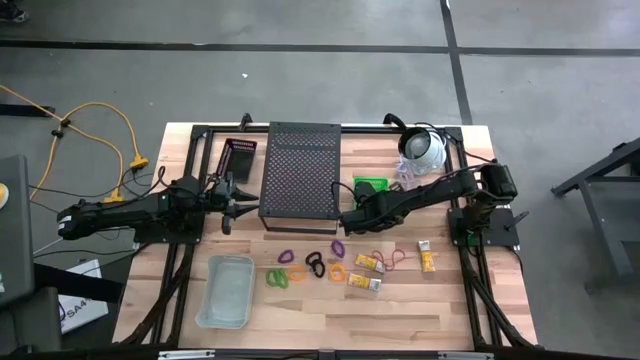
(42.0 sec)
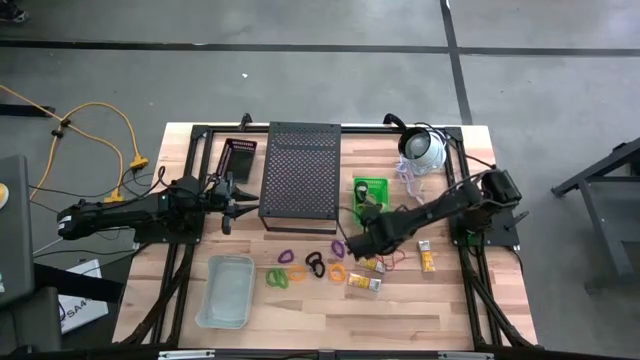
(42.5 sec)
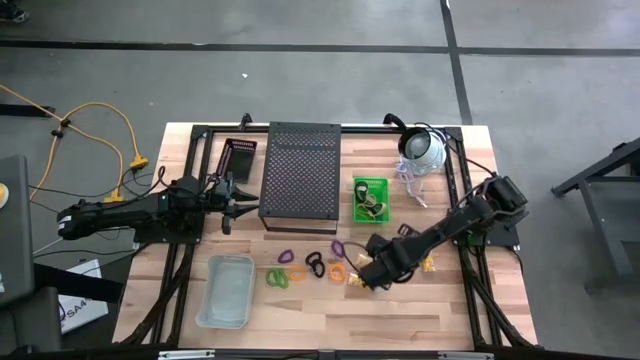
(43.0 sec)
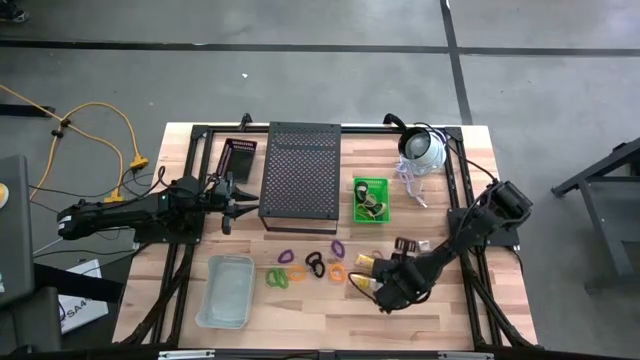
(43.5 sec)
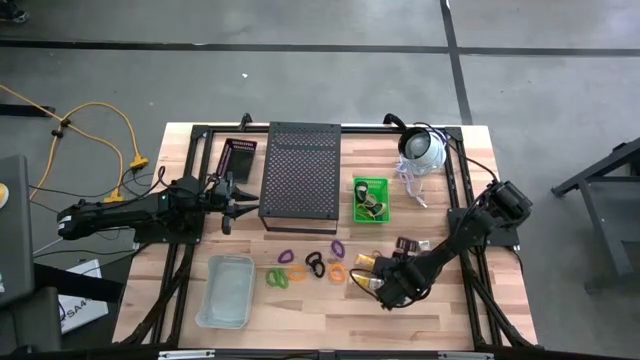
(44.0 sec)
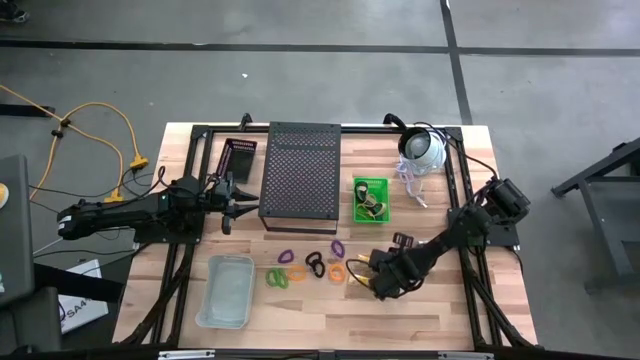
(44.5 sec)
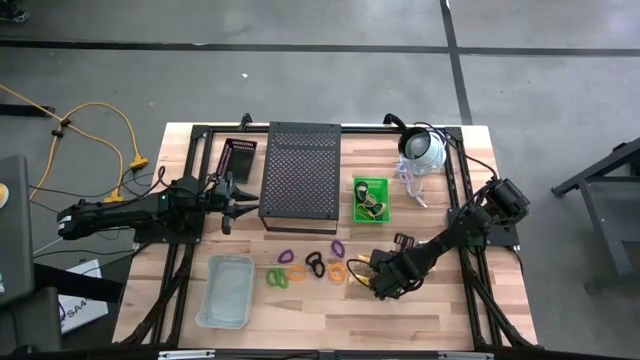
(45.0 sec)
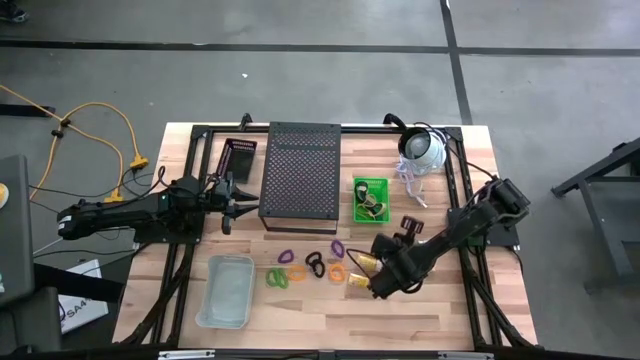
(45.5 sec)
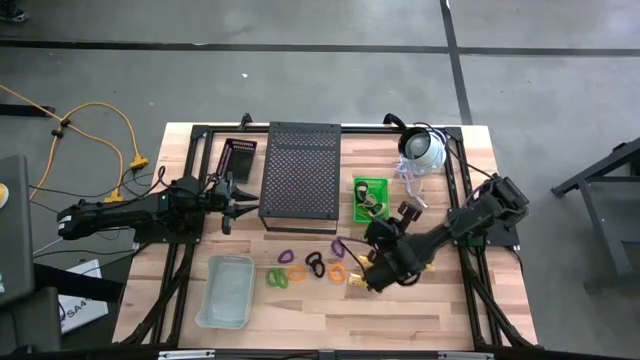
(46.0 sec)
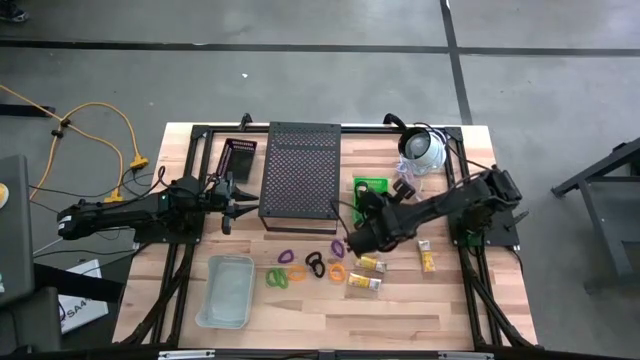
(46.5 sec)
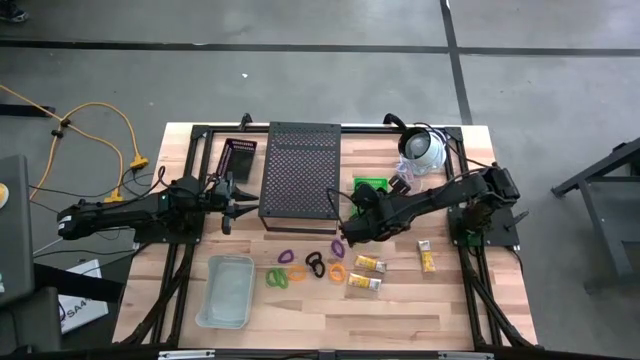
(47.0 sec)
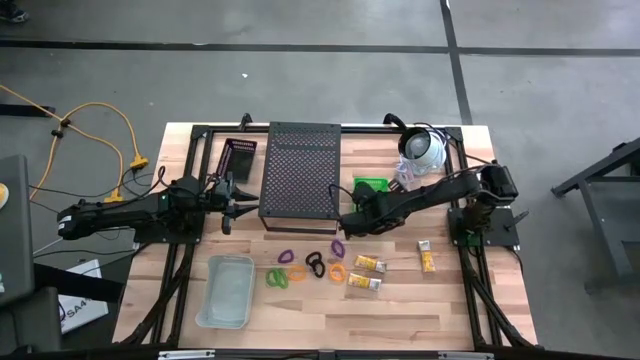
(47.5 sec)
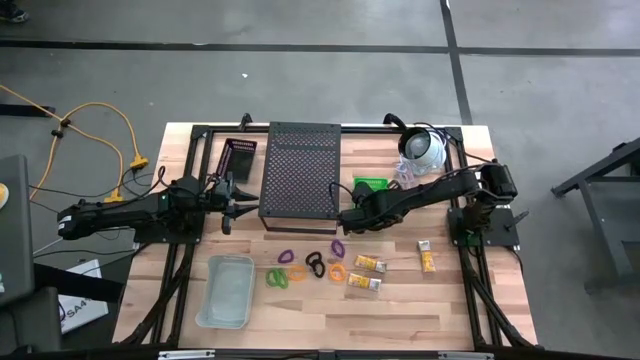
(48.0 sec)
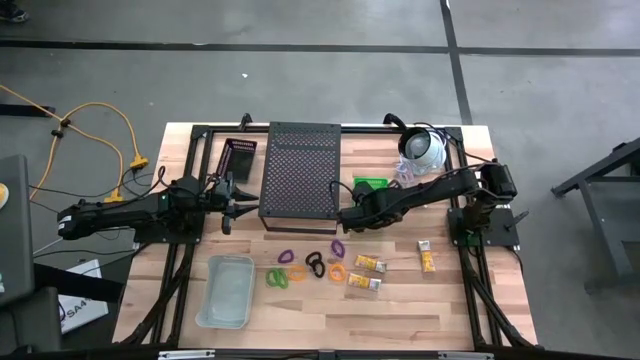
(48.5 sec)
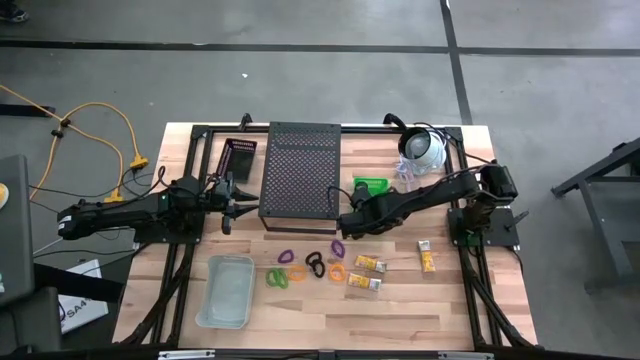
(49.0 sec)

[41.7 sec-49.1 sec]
Task: Pick & Place Office Desk Supplies
Put the red rubber band into the green basket

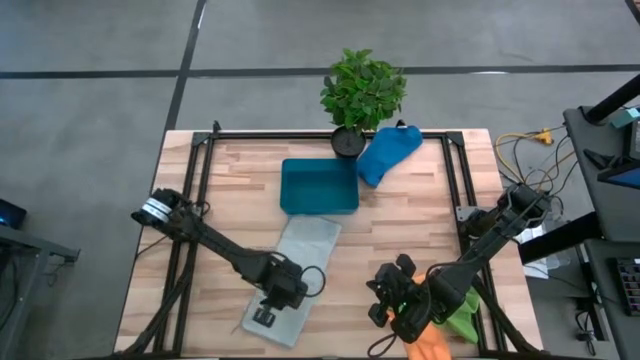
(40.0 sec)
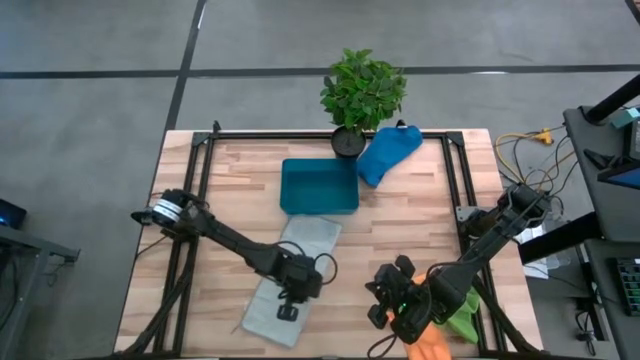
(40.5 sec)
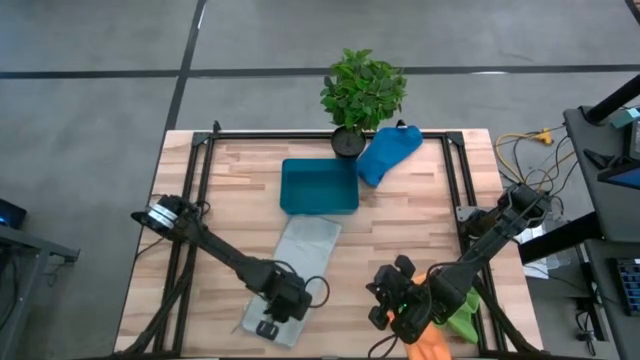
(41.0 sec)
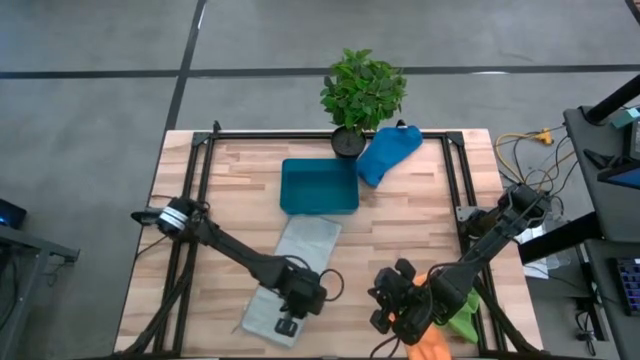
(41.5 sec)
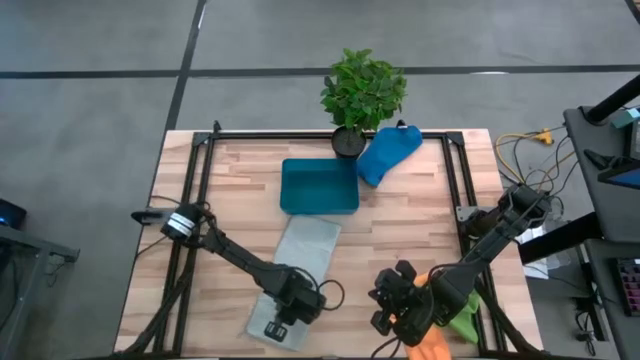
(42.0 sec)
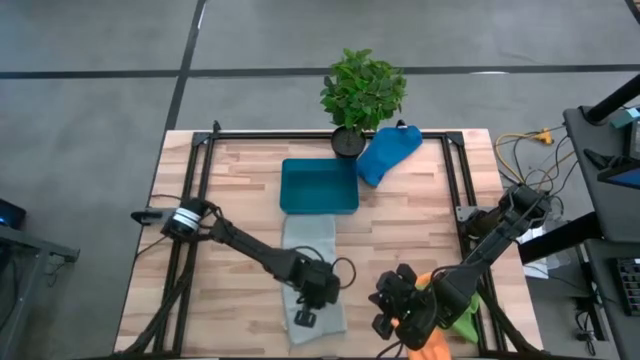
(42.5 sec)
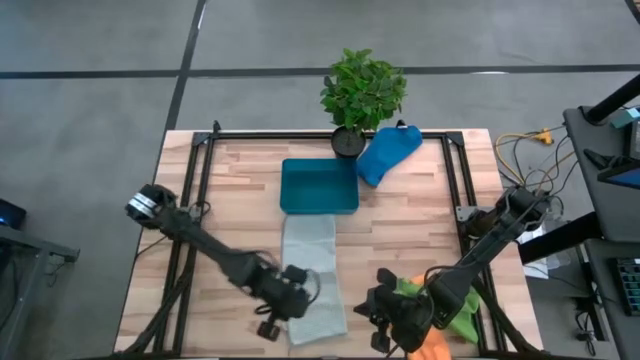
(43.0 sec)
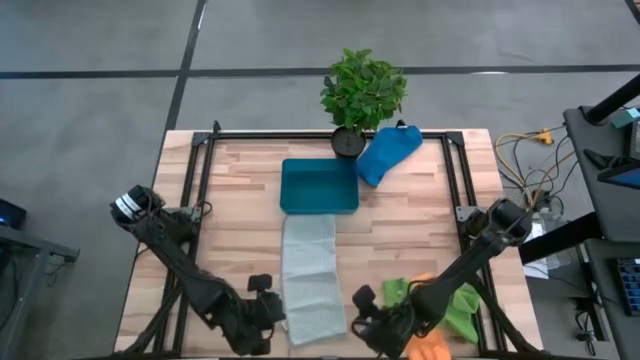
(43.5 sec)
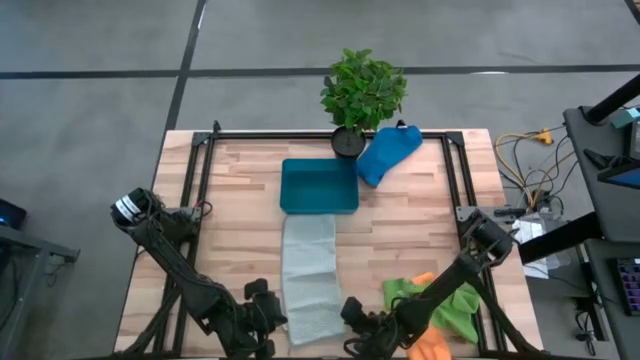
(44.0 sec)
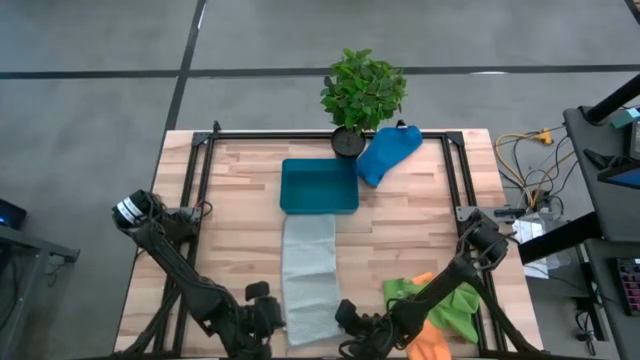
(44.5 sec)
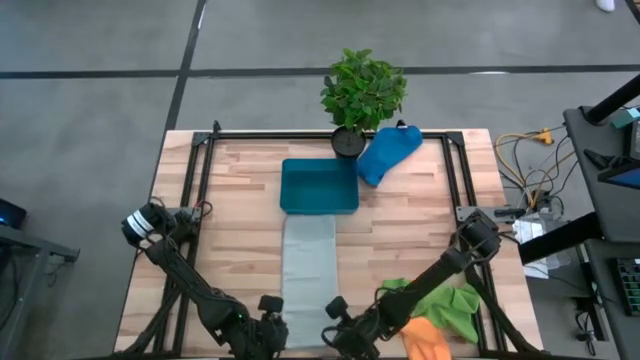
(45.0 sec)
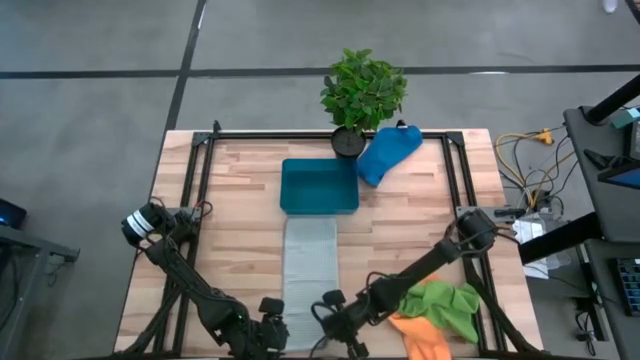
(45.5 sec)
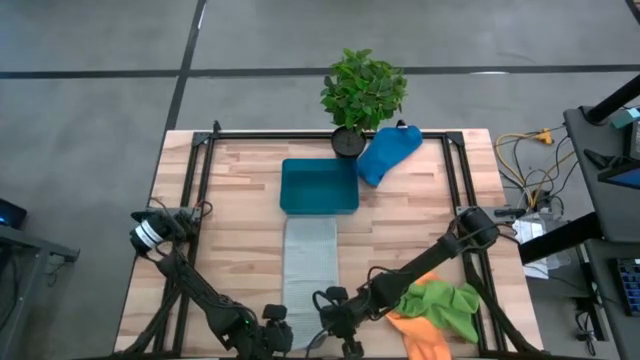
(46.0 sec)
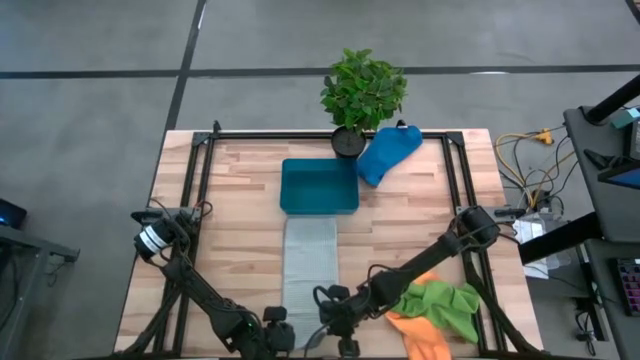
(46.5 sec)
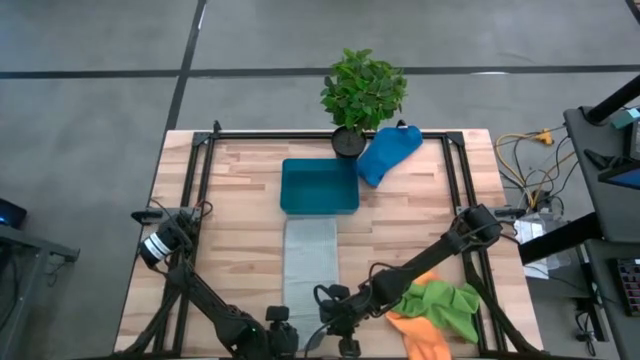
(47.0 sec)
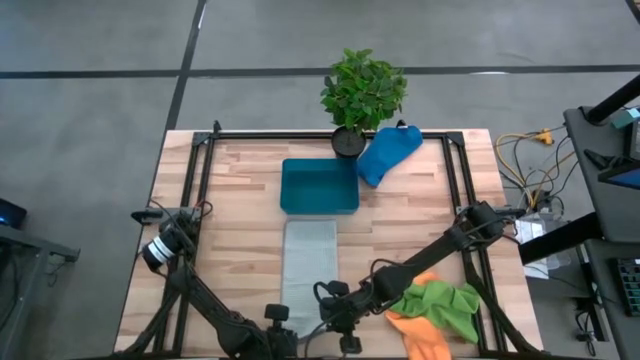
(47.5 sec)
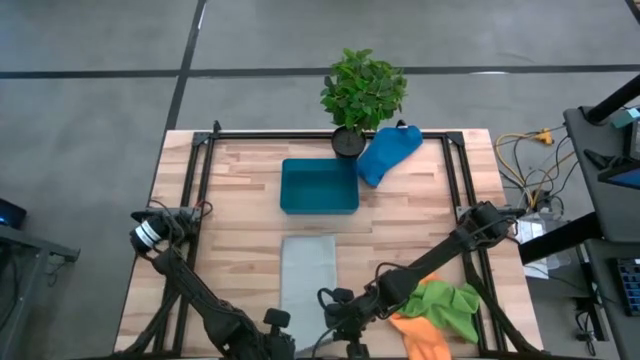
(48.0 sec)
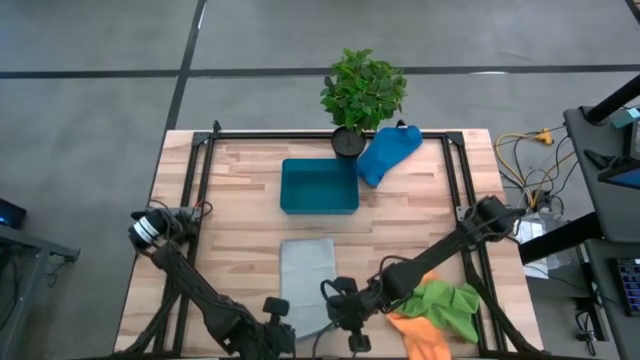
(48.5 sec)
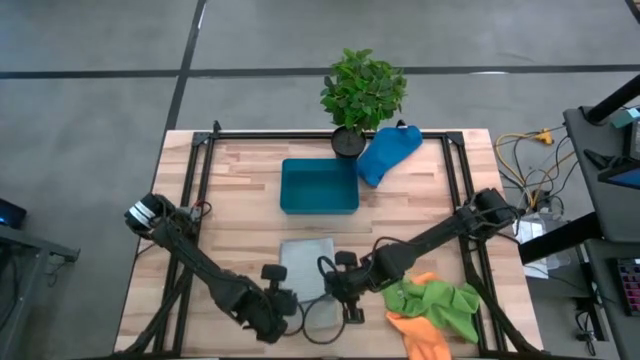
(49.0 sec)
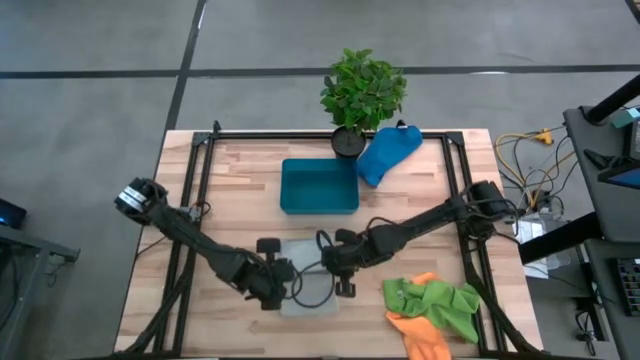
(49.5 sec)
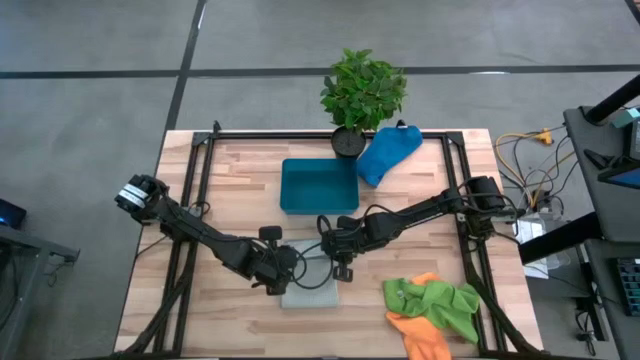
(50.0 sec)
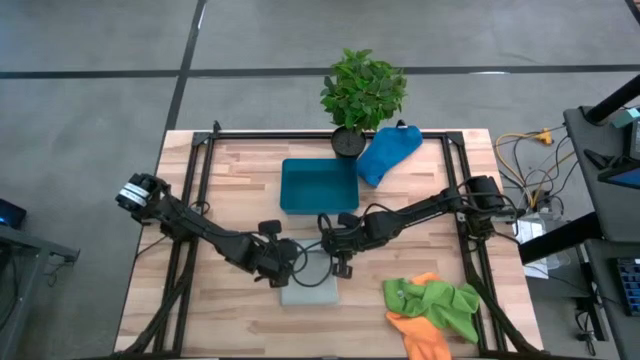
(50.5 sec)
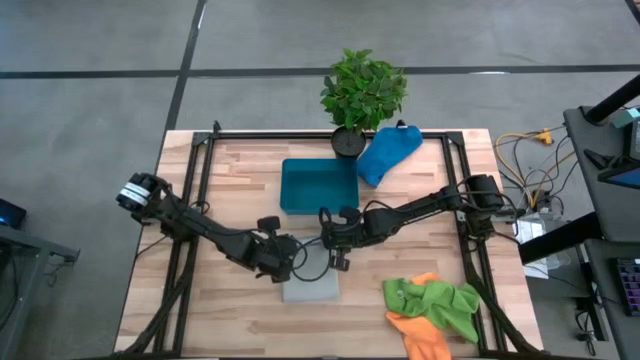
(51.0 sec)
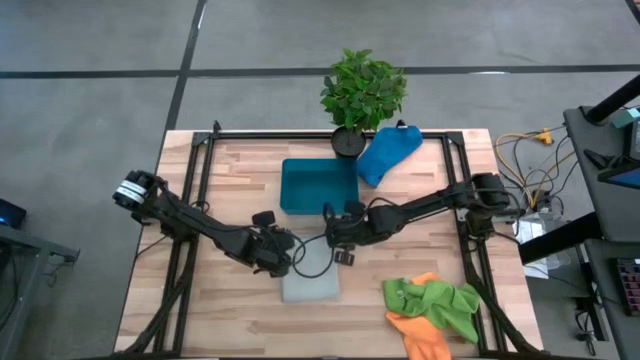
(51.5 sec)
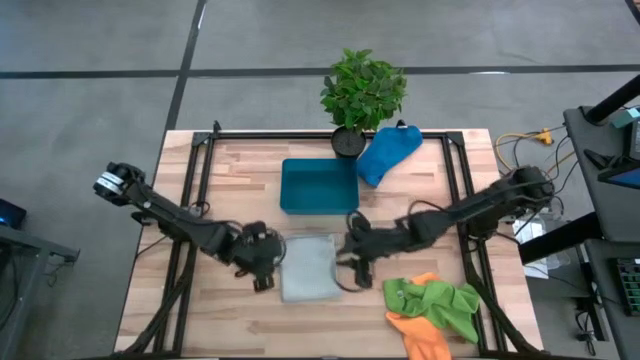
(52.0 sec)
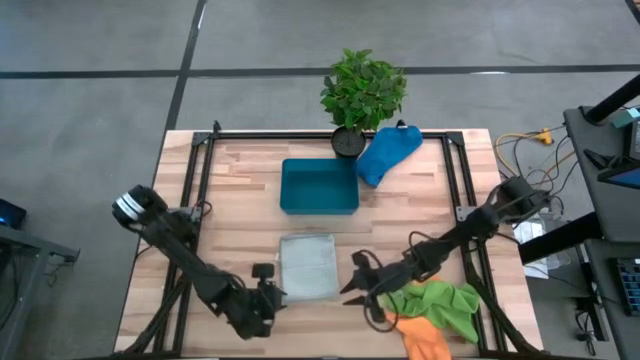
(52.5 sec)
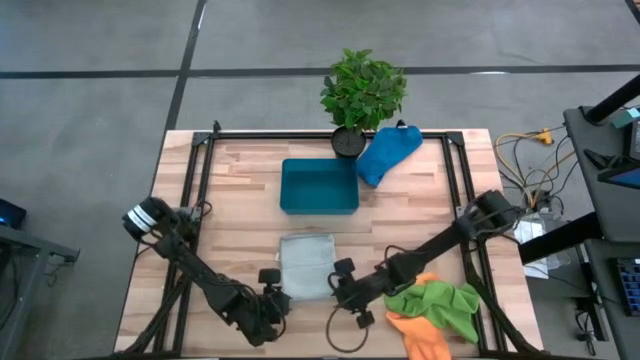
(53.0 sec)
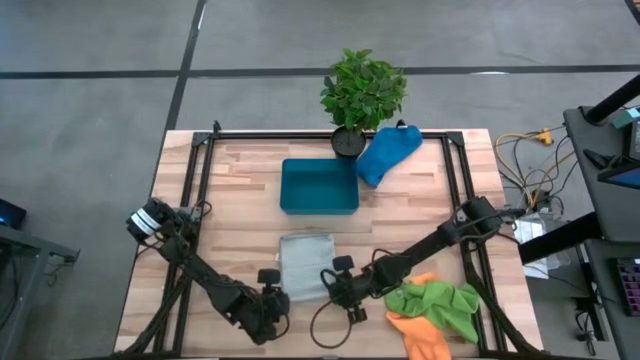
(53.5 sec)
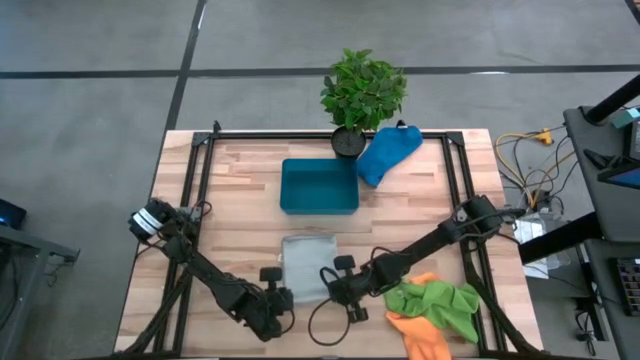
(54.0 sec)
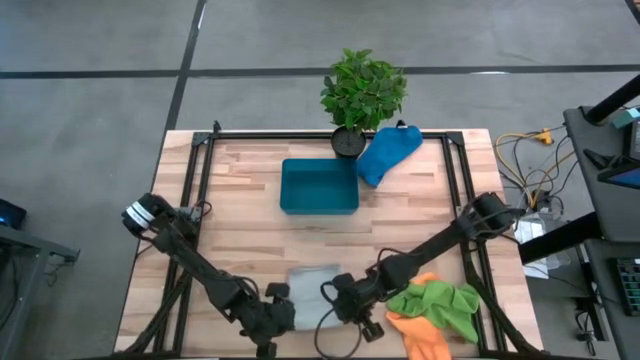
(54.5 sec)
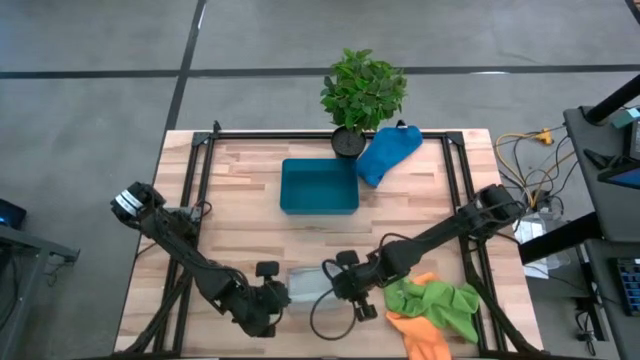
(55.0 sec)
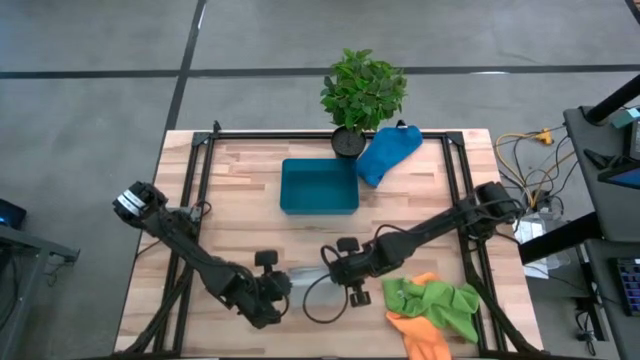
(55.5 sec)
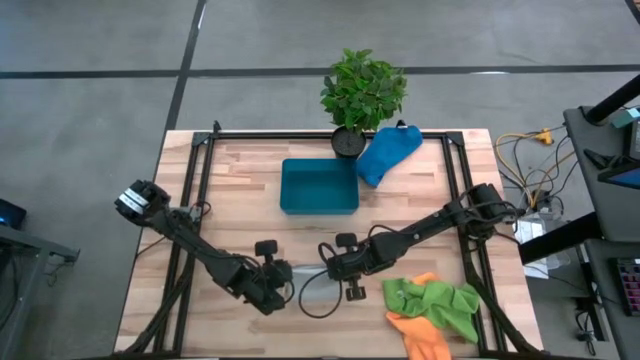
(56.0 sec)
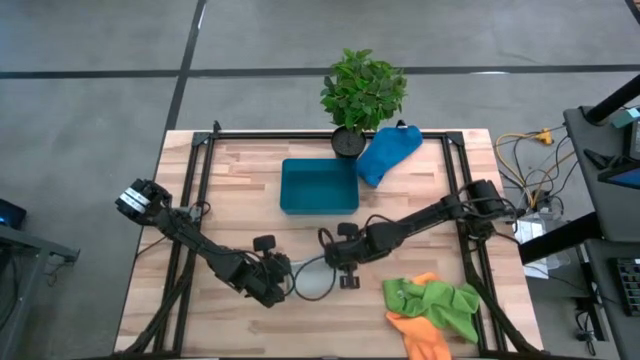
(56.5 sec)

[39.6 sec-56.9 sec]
Task: Fold microfiber towels
Fold the gray microfiber towel
